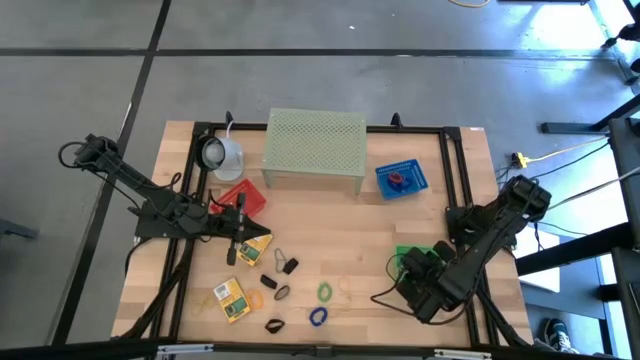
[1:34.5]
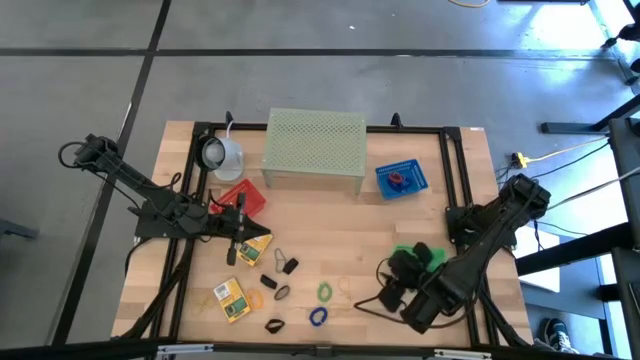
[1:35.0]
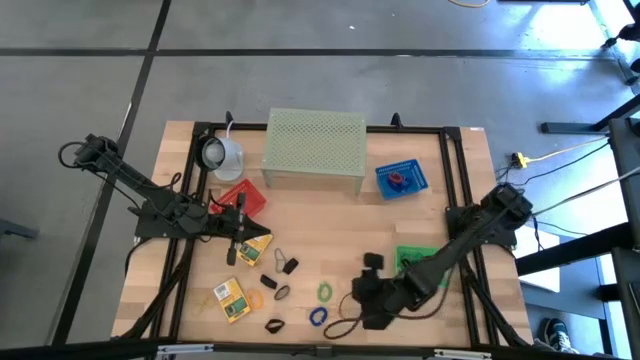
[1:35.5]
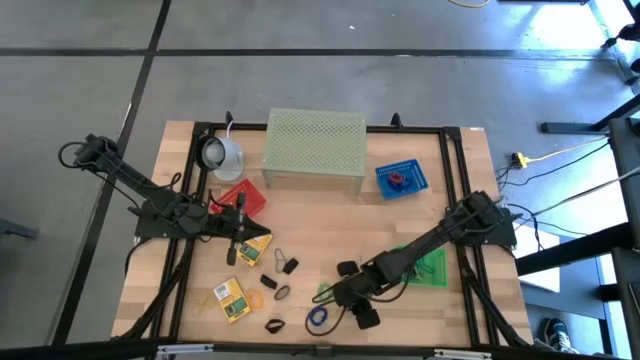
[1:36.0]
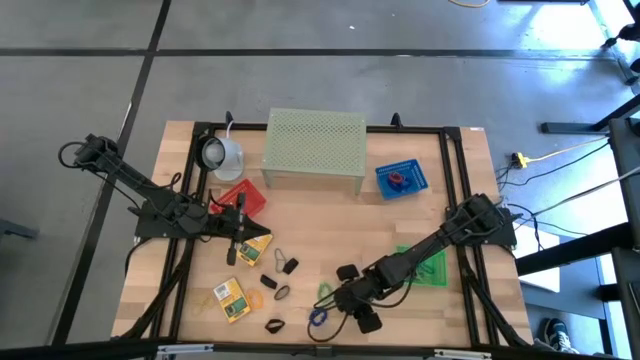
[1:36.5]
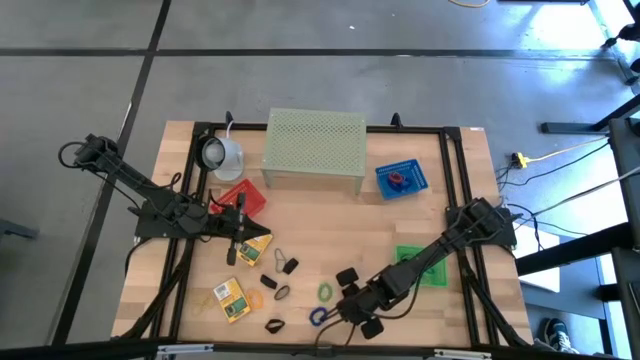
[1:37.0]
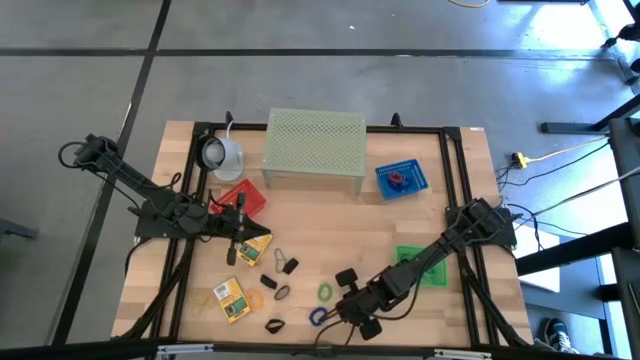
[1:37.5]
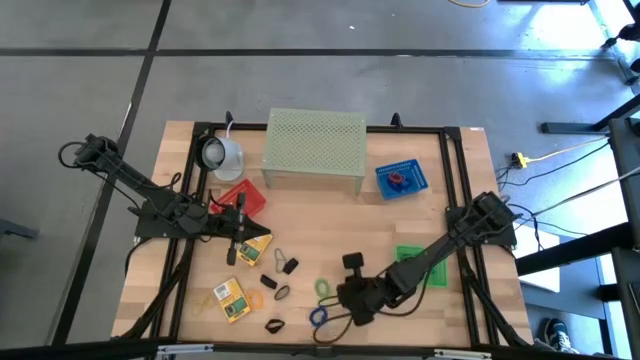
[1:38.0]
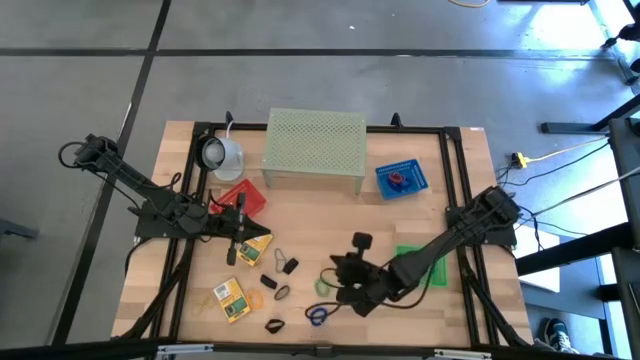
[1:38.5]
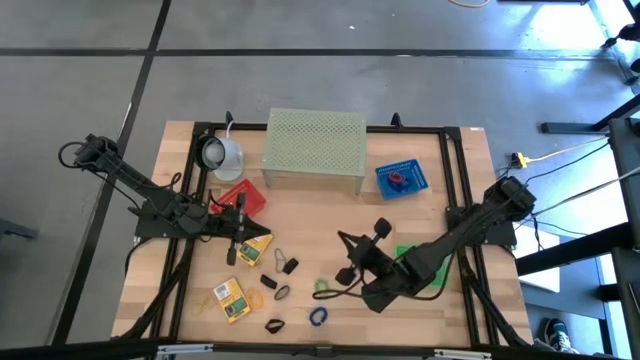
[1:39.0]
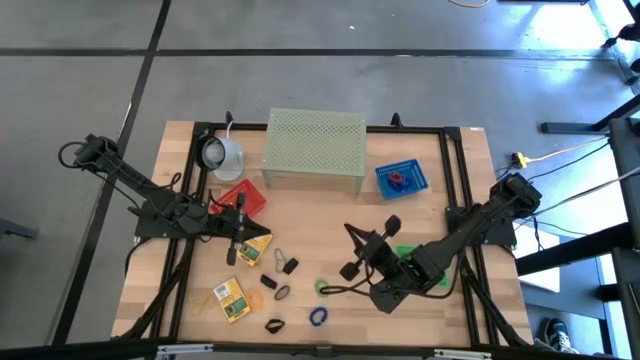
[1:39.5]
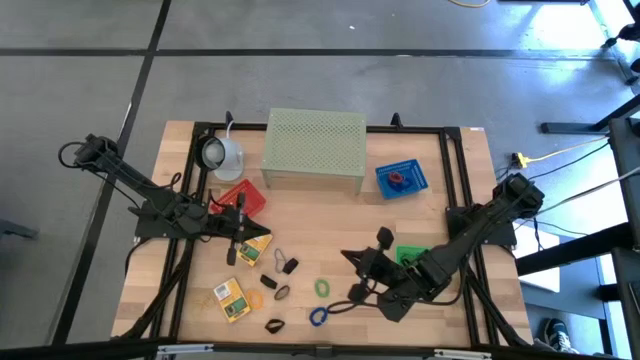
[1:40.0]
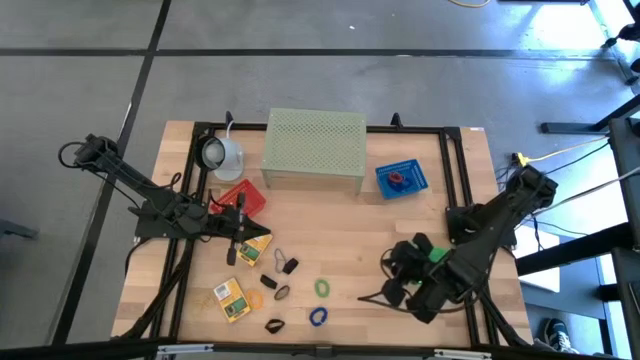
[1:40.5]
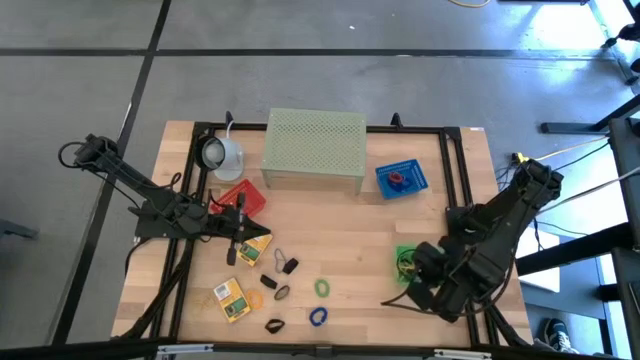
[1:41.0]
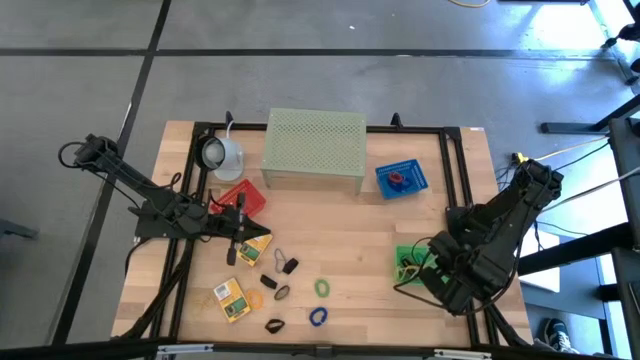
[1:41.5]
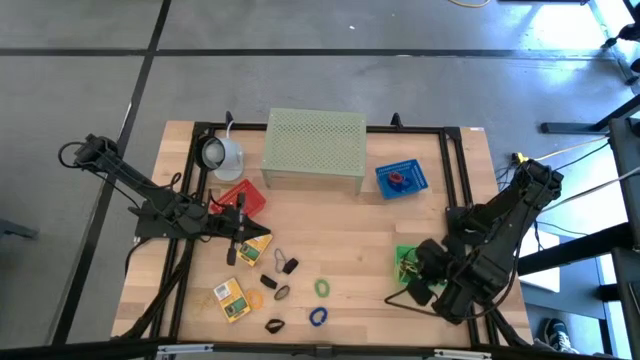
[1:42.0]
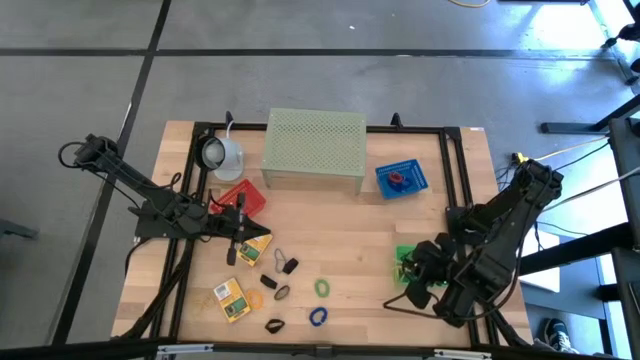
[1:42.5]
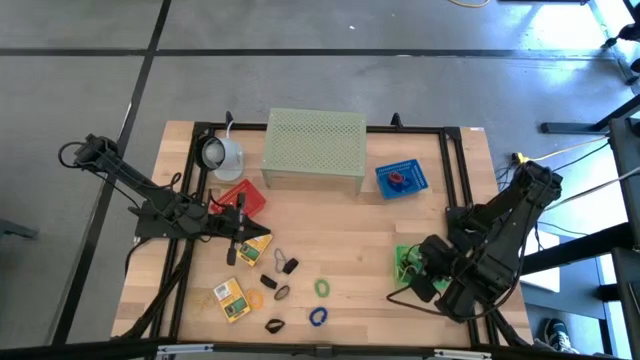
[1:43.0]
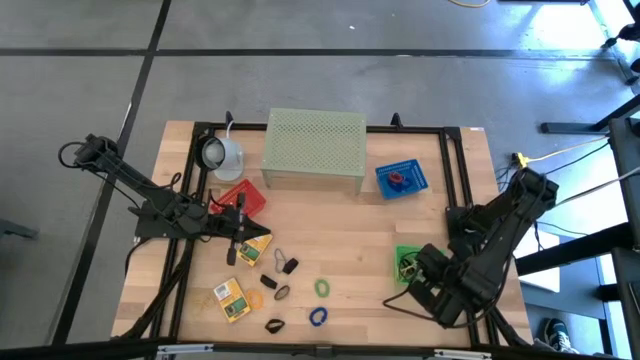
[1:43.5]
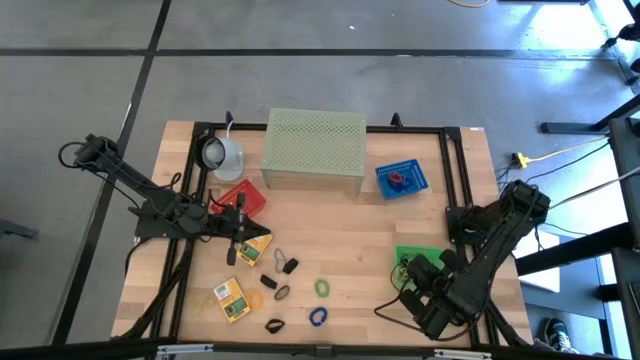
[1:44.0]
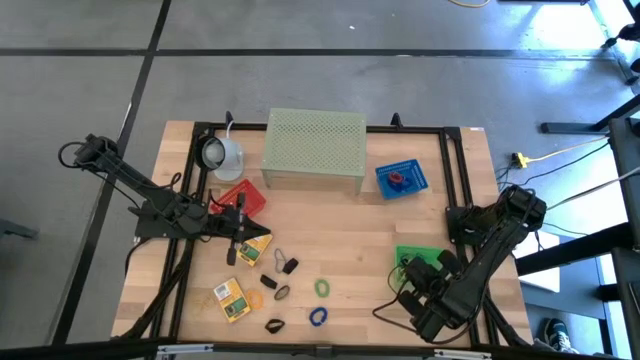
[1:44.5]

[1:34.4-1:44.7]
Task: Pick & Place Office Desk Supplies
Put the yellow rubber band into the green bin

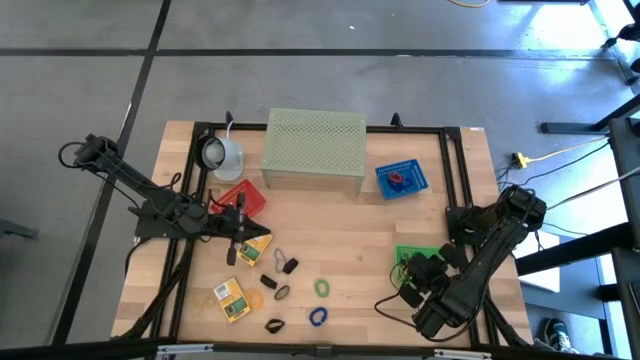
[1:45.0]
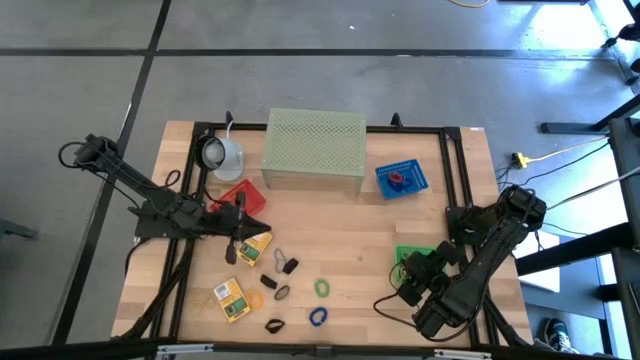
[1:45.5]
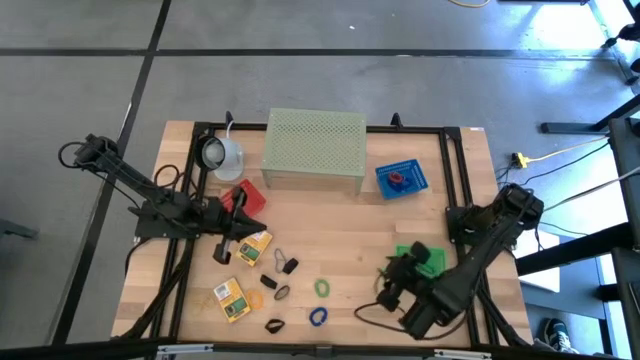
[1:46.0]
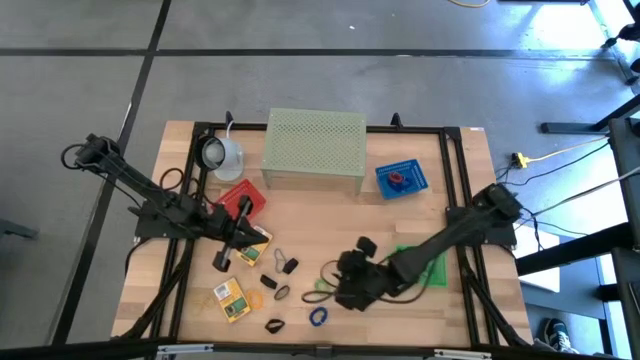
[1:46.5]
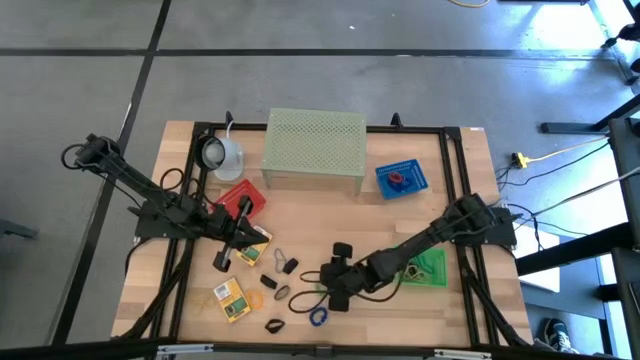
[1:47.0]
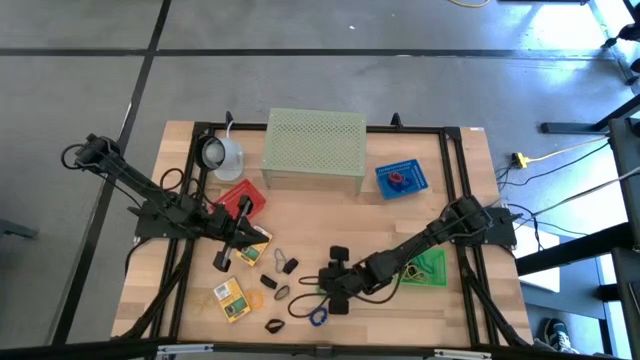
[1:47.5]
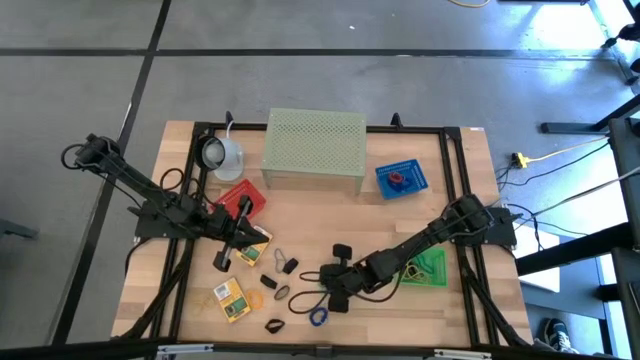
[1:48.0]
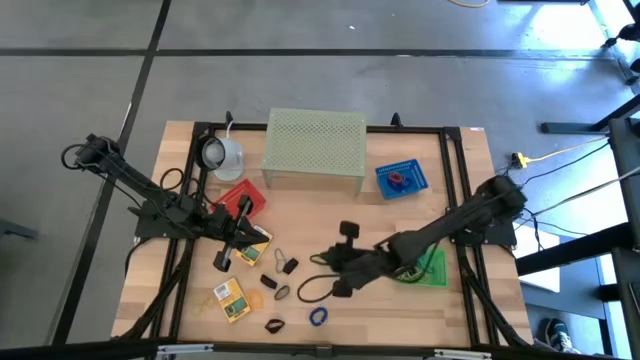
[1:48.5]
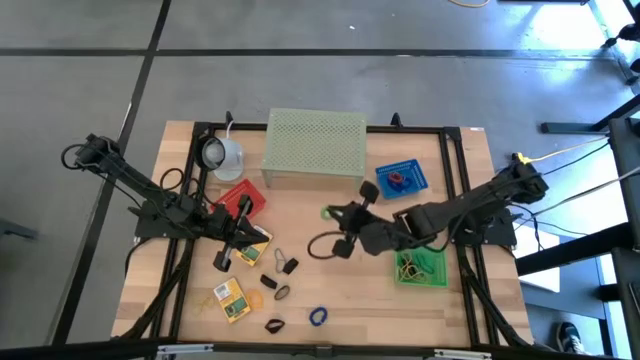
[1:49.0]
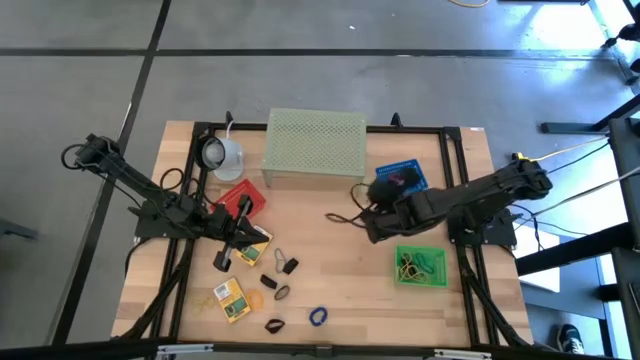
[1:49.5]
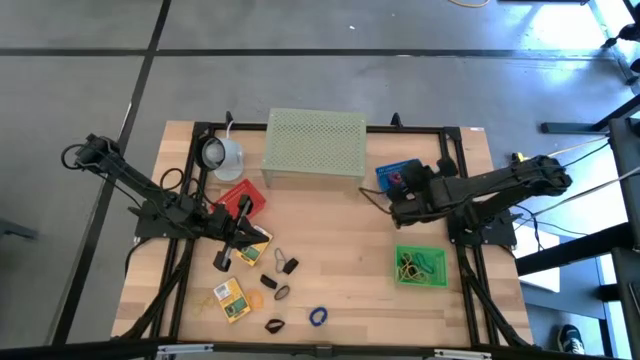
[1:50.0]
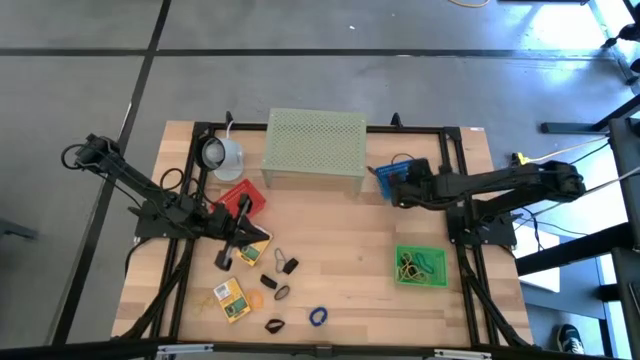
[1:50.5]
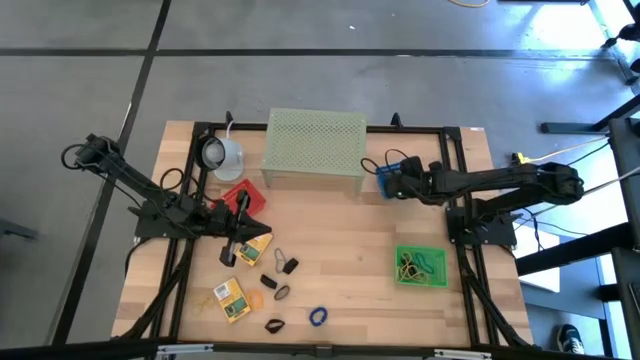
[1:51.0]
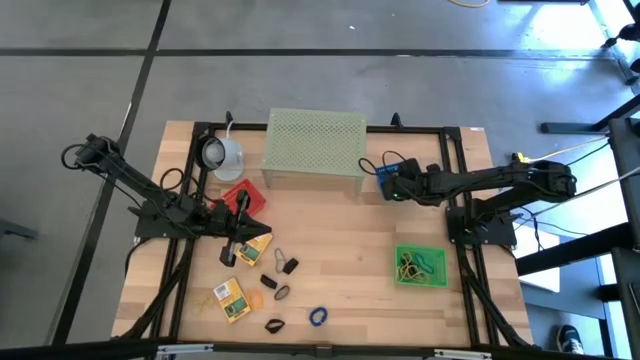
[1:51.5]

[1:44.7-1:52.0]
Put the green spring keychain into the blue bin

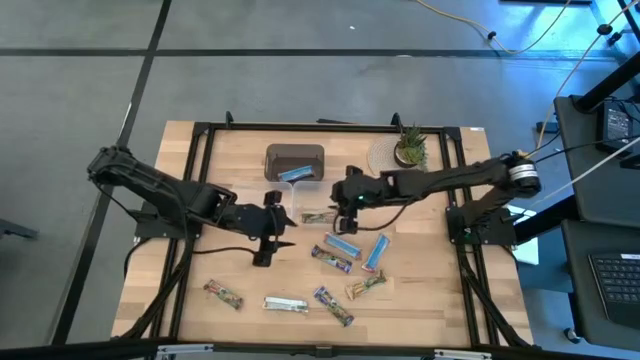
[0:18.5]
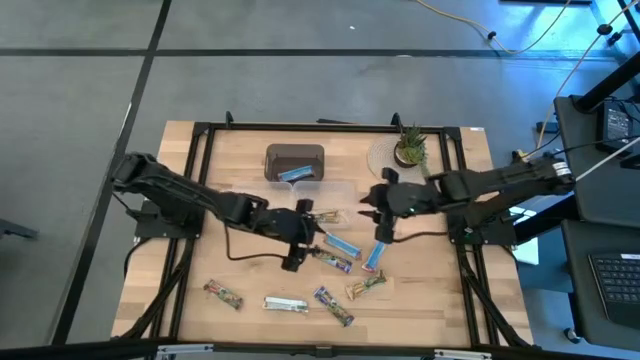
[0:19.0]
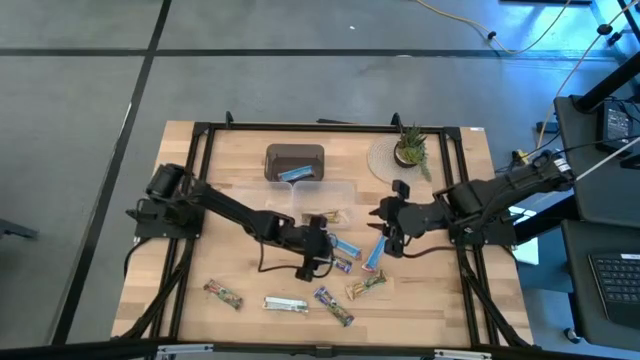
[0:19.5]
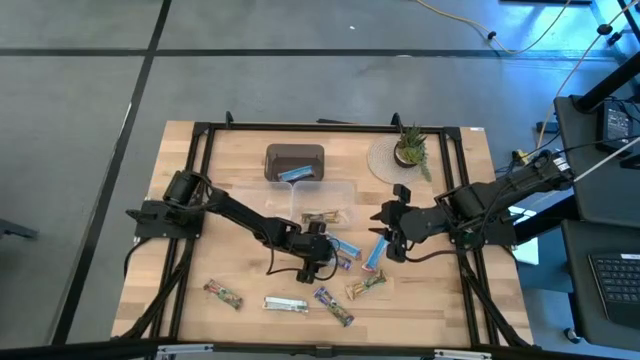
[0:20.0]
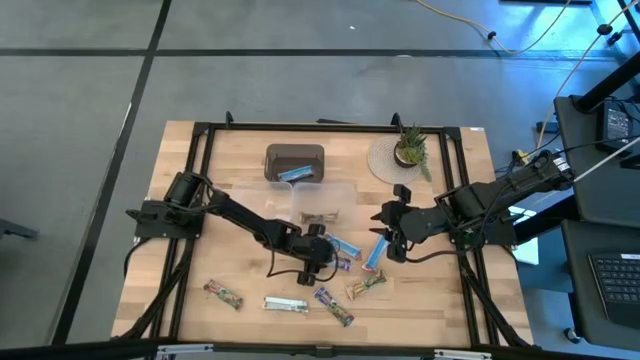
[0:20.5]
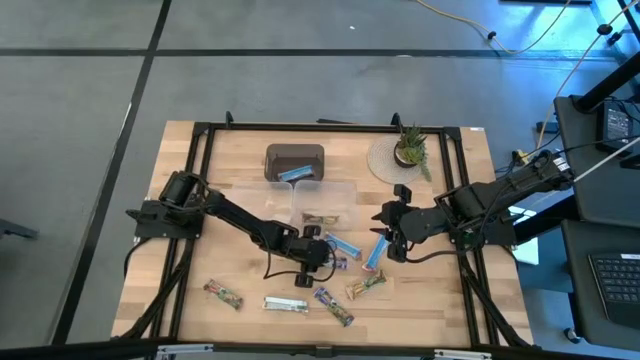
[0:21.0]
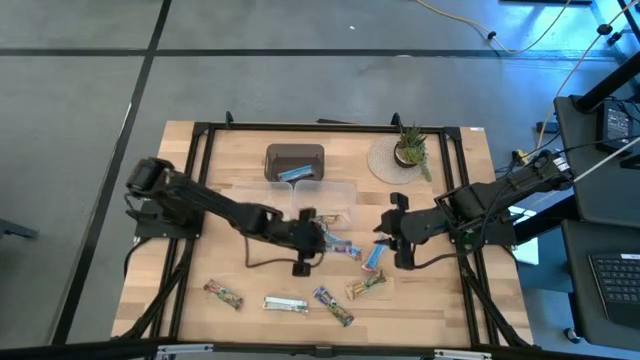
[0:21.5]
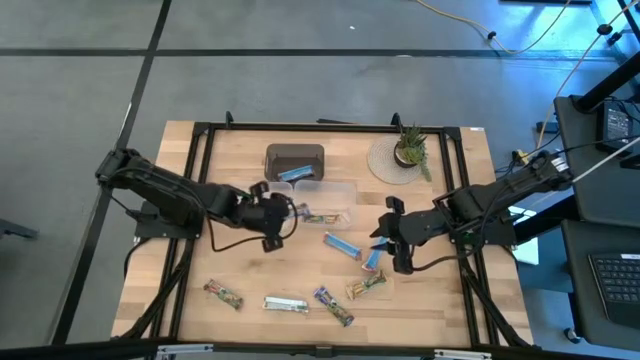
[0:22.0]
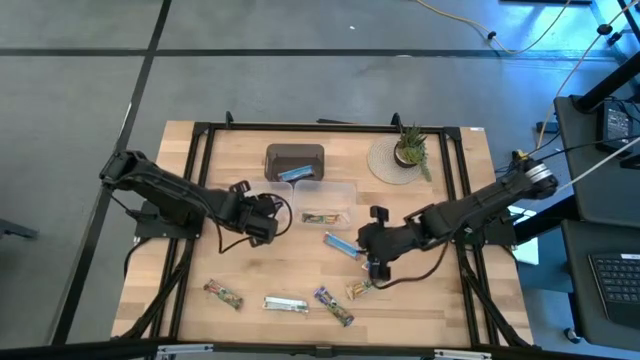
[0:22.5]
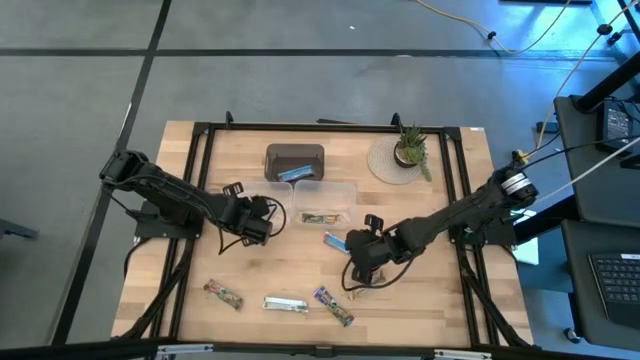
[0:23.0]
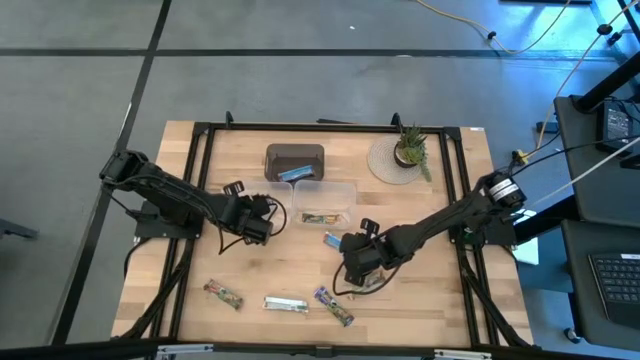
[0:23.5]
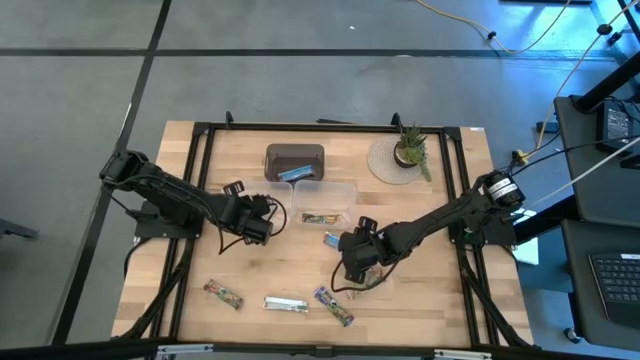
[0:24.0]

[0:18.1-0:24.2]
Task: Pick and place Granola Bars by type
Put the blue granola bar into the left transparent bin
